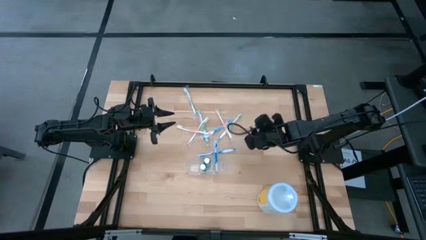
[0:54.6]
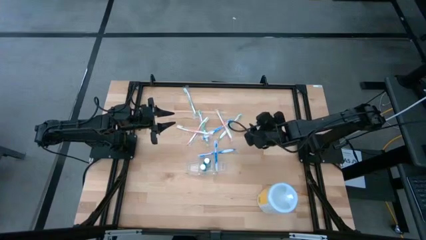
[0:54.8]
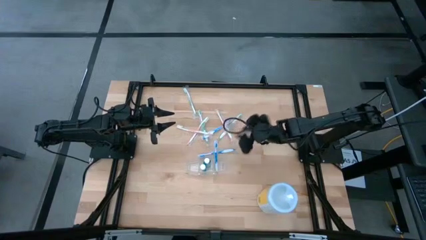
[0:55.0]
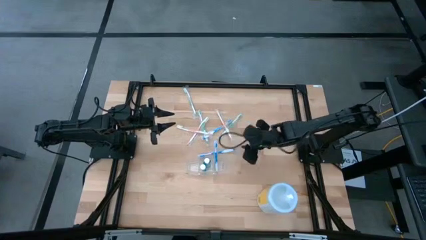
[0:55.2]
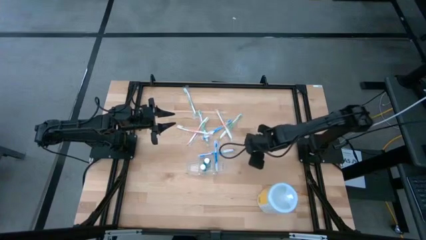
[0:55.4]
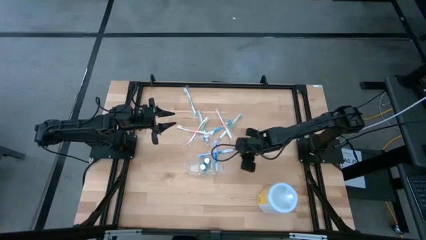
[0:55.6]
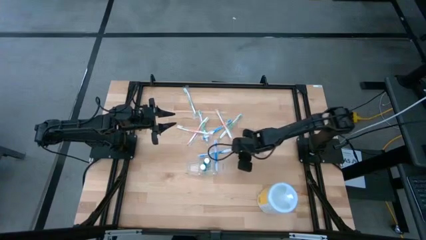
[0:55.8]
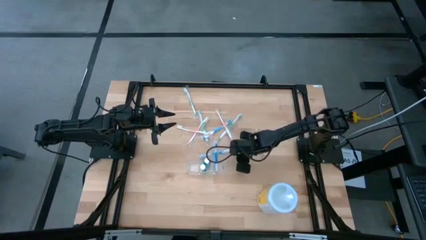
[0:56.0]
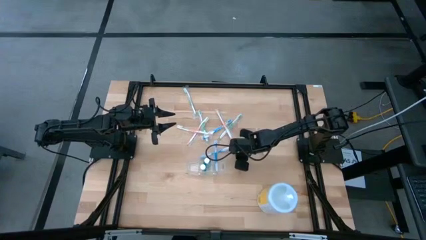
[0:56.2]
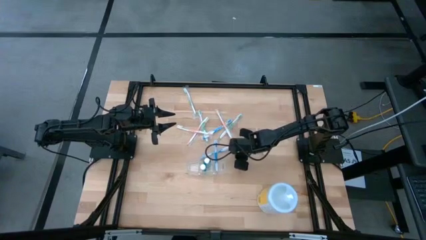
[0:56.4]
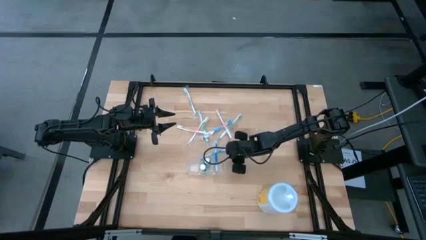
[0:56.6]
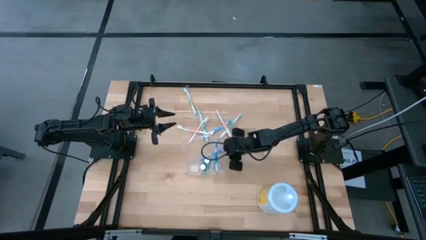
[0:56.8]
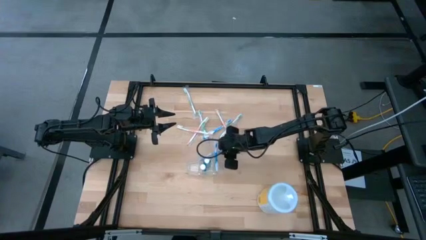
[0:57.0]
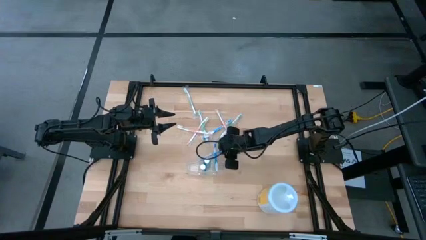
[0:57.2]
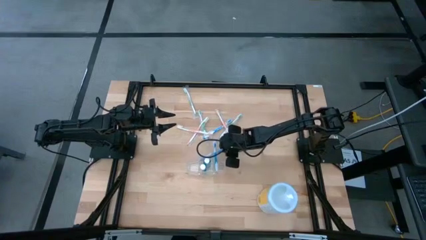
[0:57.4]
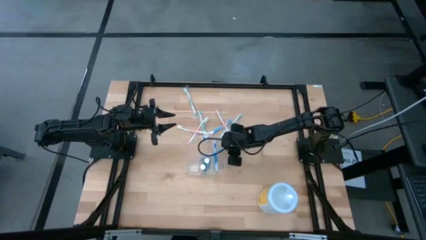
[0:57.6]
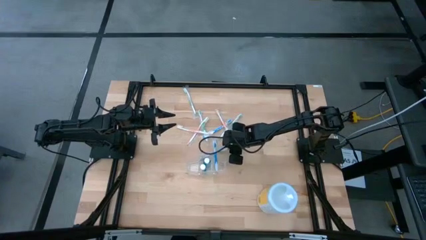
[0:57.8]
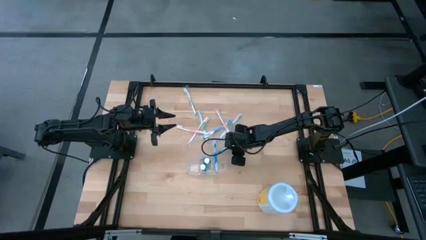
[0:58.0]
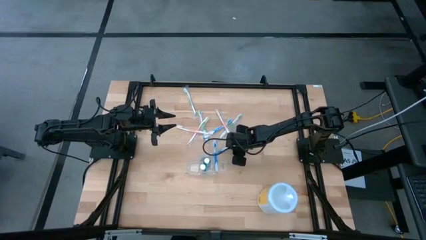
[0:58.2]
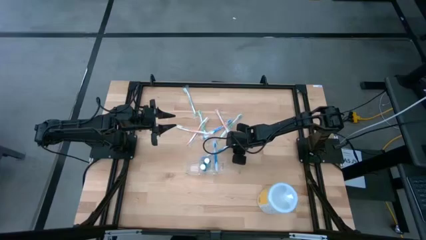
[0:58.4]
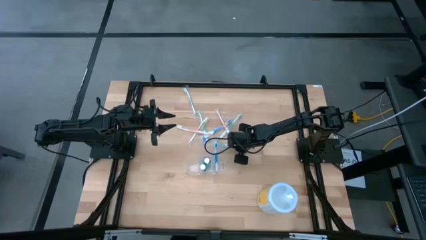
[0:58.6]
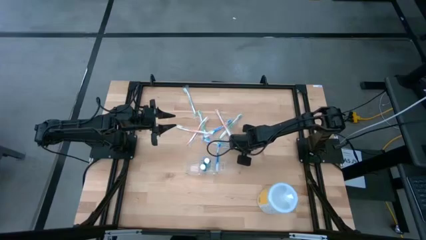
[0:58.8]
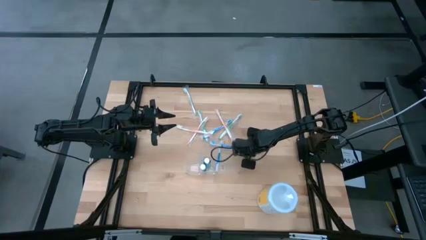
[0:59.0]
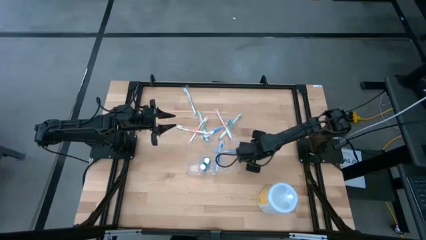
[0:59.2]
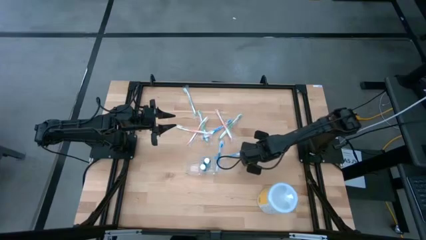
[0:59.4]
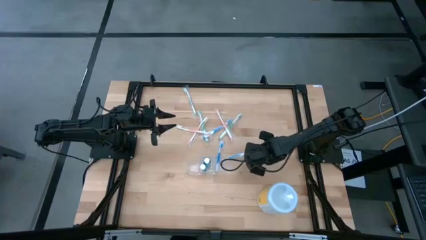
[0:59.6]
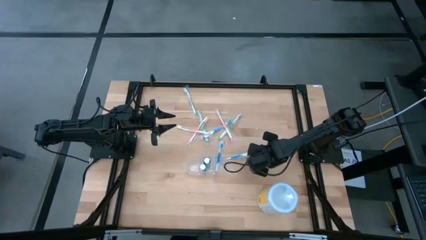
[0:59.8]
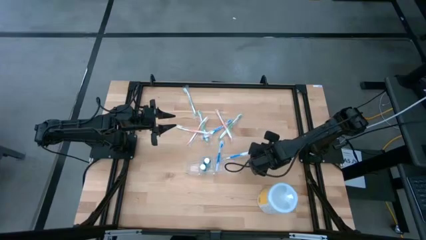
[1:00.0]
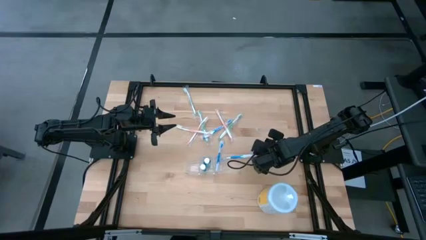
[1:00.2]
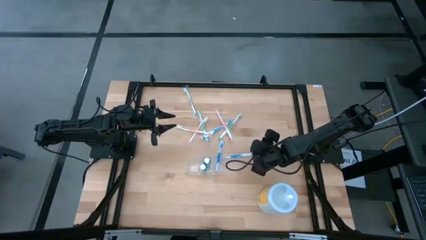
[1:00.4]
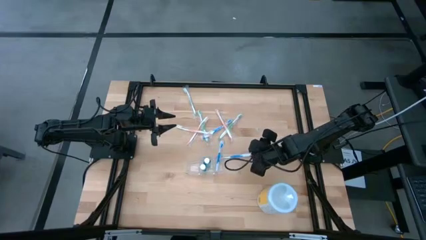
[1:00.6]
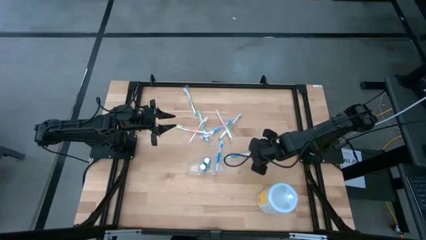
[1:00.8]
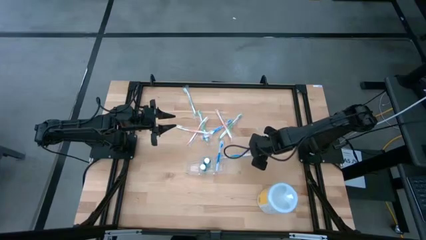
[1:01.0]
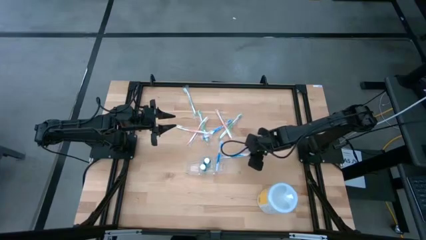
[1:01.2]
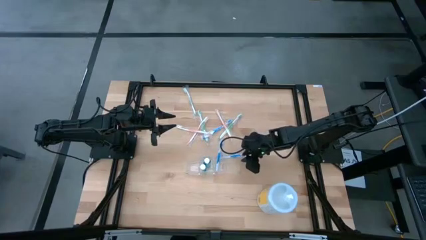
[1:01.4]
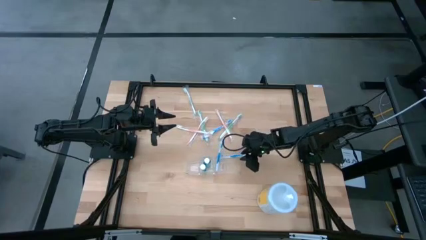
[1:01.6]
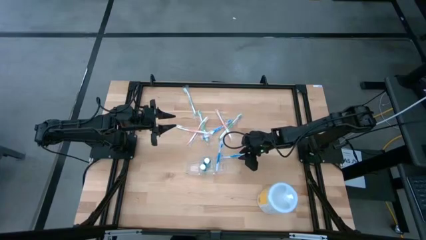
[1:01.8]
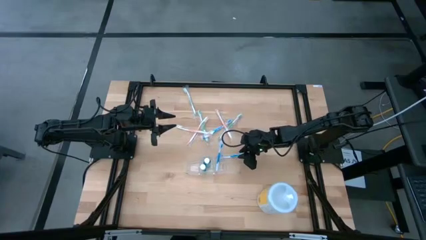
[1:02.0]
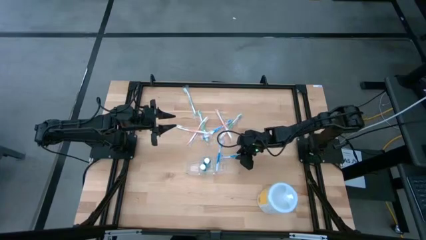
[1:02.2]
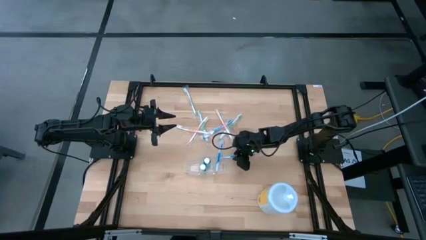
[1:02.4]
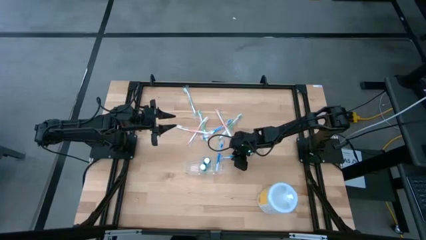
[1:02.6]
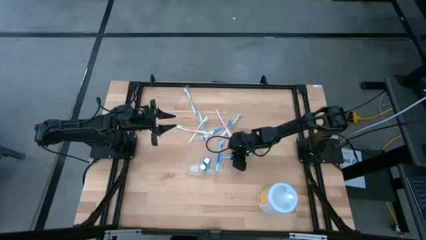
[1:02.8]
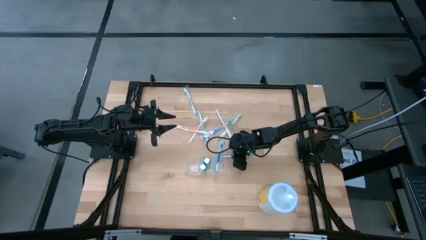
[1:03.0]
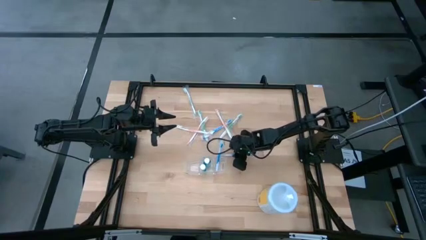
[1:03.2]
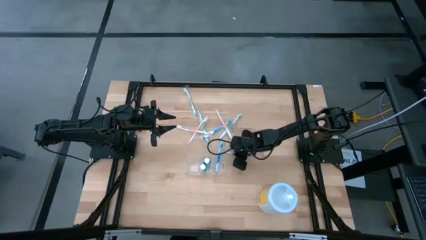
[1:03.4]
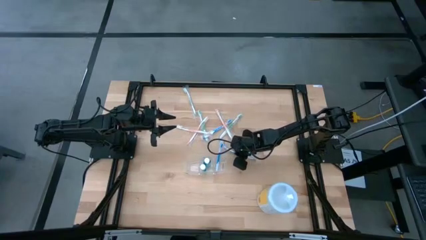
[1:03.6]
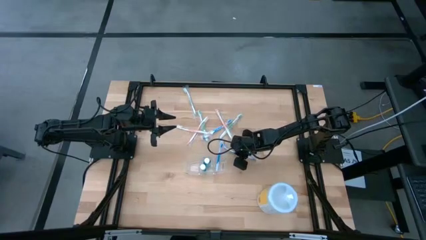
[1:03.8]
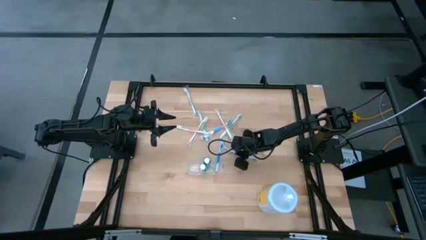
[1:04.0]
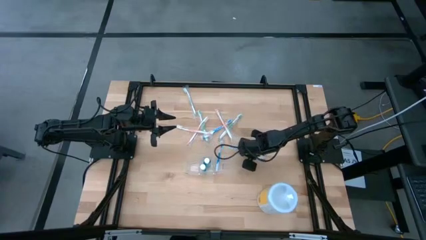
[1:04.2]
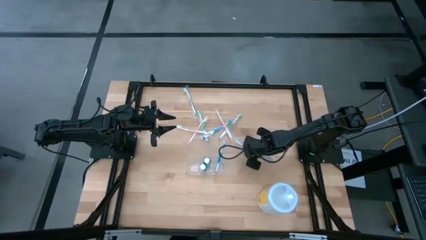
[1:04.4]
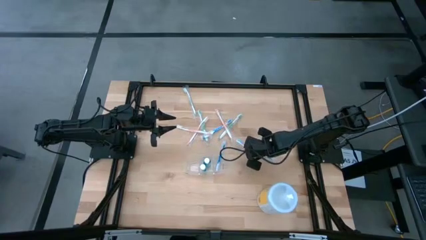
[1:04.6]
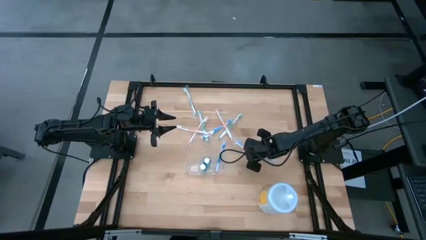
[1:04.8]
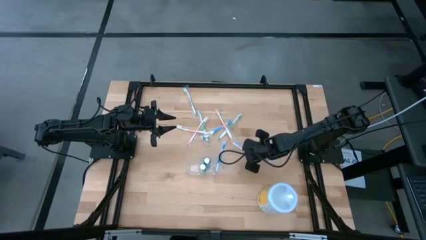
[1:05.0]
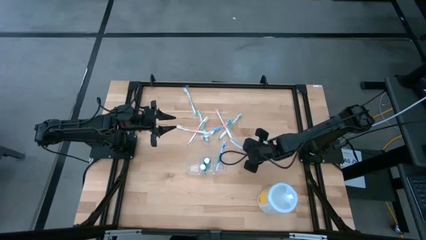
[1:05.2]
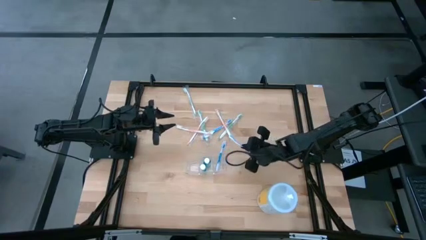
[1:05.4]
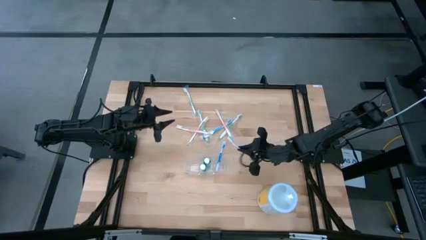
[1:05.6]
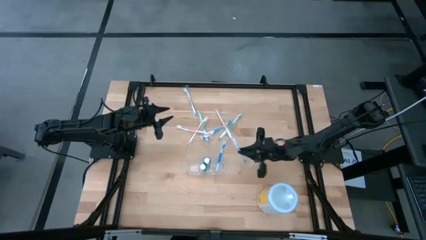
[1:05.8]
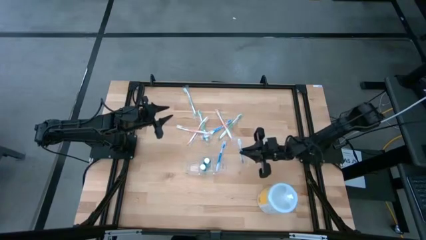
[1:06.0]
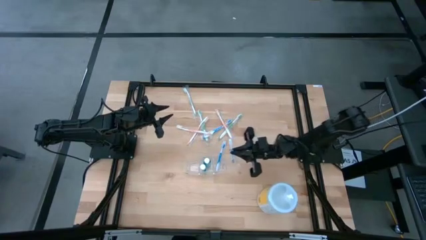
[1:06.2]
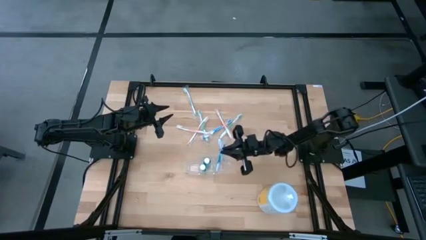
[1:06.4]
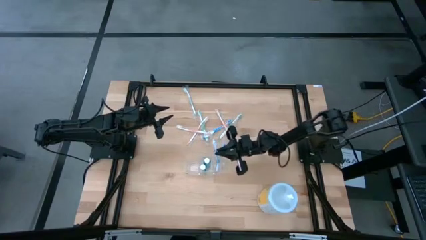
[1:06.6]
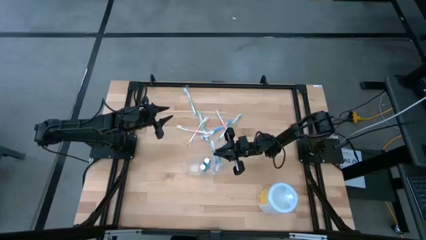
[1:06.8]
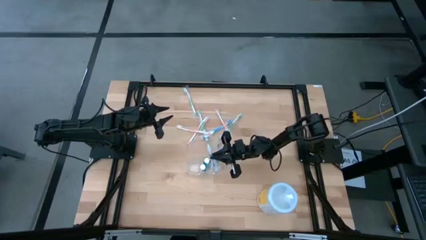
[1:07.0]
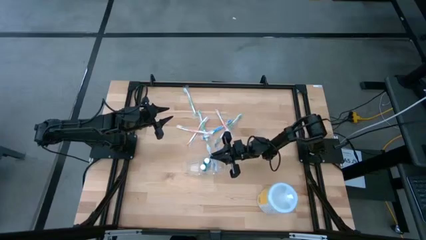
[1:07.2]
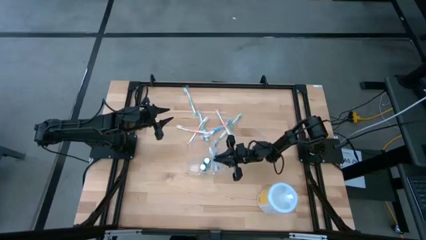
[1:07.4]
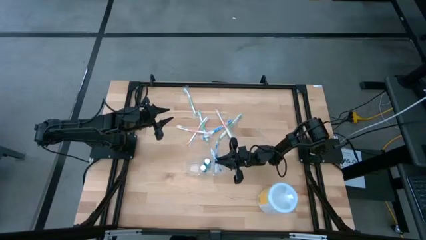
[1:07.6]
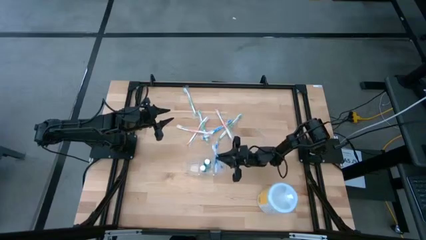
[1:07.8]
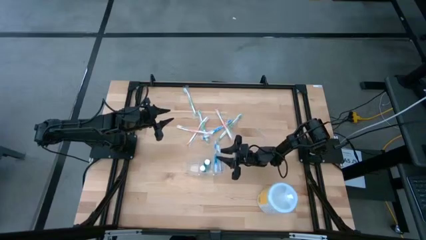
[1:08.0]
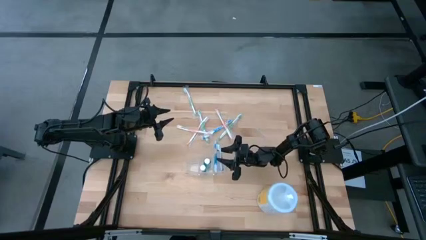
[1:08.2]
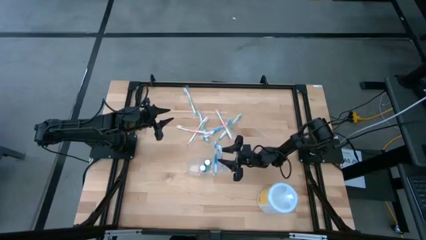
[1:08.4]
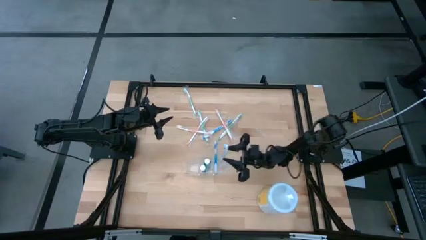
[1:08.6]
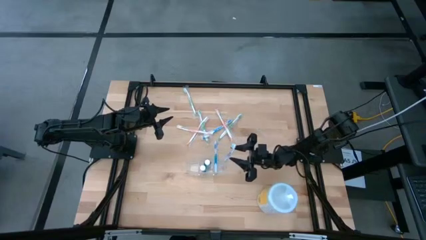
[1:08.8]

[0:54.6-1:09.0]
Task: Pick & Place toothbrushing station
Put the blue toothbrush into the transparent organizer

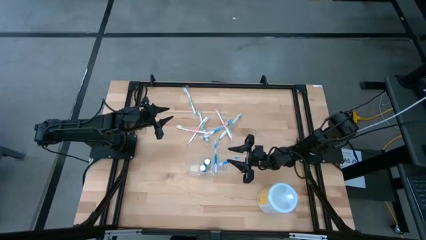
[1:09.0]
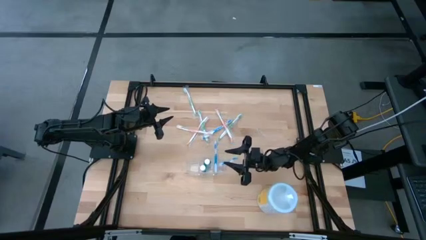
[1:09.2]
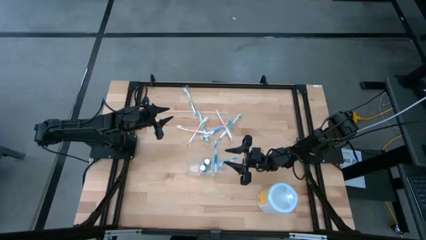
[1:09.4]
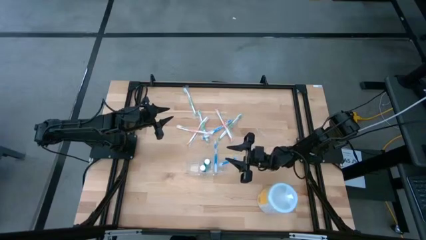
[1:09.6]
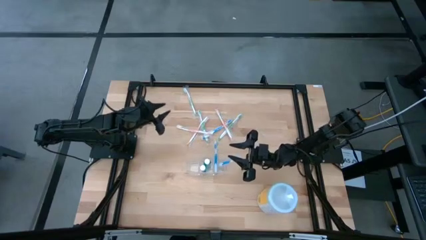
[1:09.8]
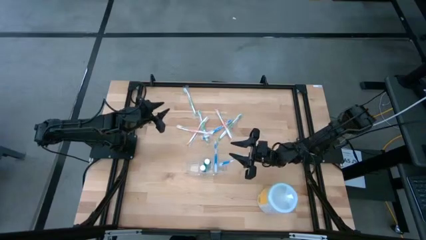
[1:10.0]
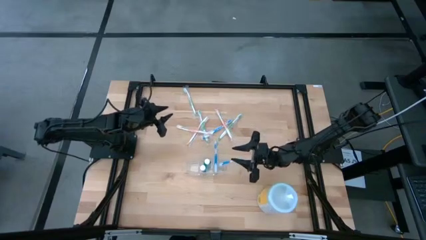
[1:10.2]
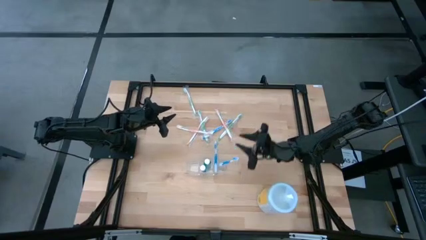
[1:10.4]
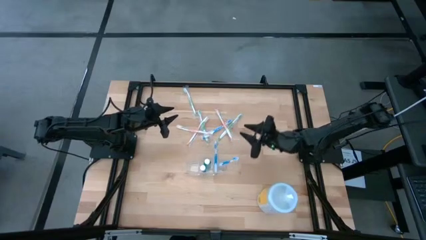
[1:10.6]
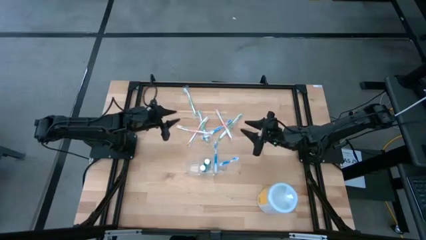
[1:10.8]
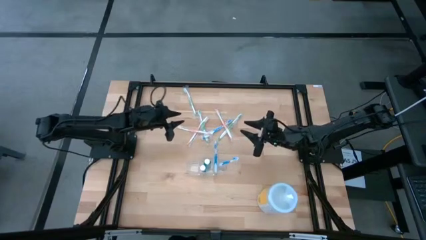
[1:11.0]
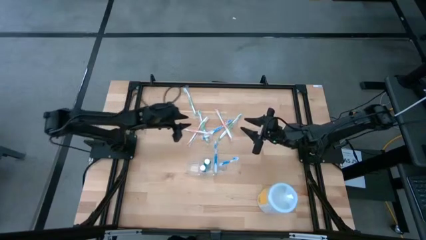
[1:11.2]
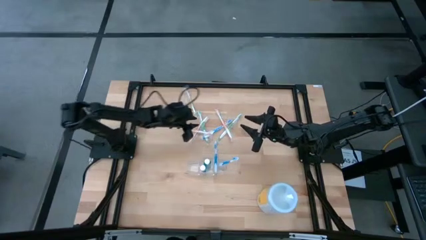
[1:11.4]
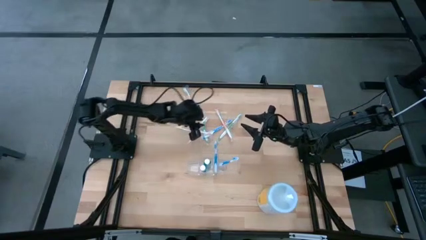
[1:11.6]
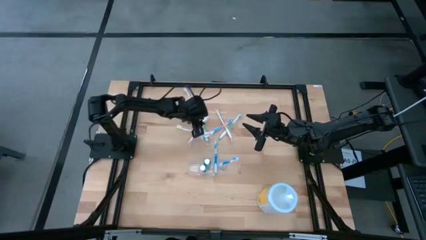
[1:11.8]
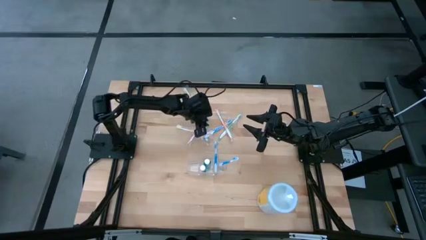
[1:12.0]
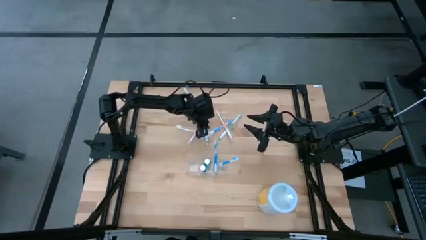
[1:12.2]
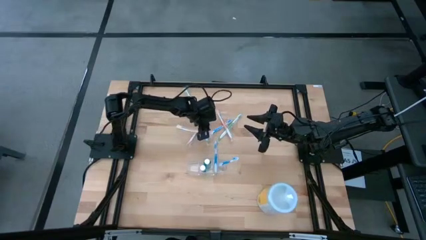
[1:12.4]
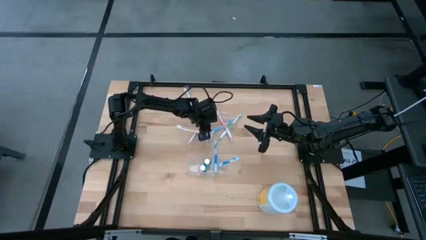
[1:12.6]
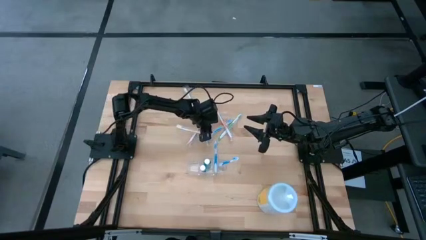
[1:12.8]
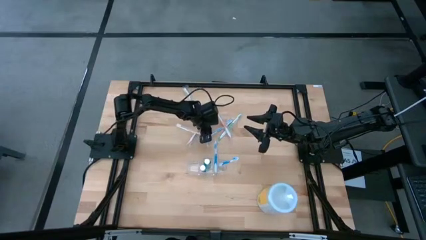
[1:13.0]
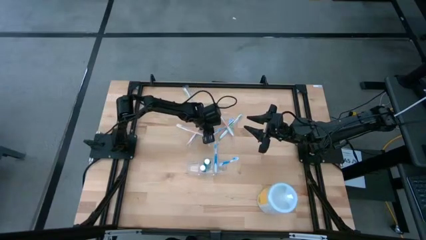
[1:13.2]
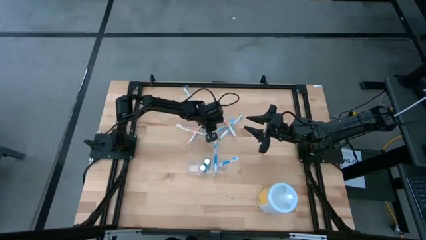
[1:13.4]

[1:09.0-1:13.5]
Put the blue toothbrush into the transparent organizer
